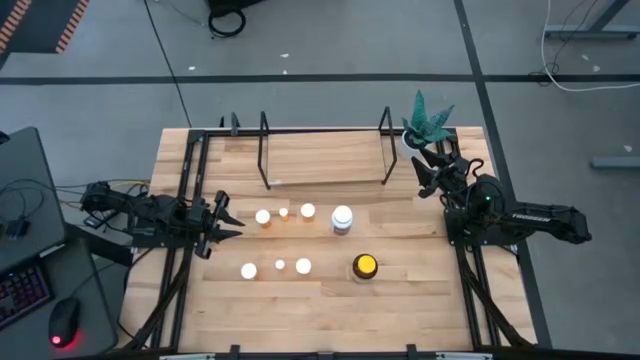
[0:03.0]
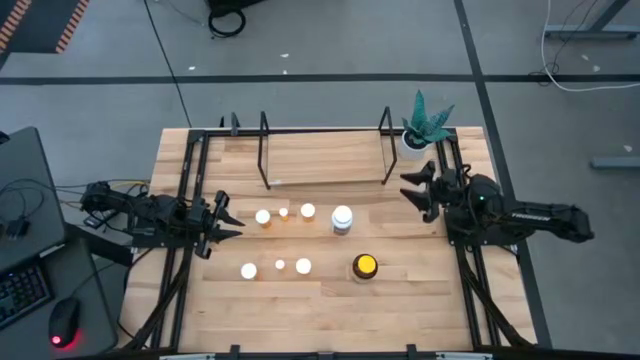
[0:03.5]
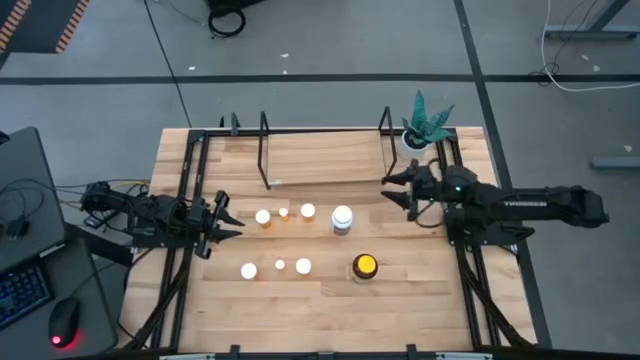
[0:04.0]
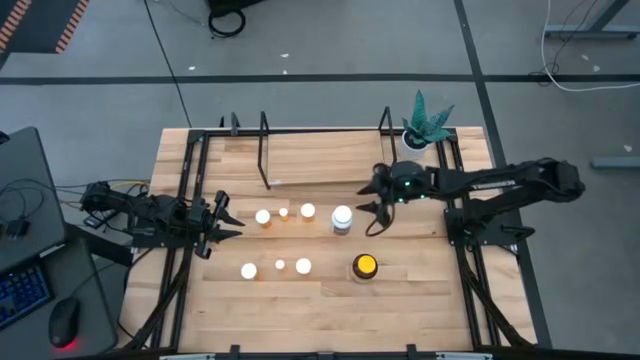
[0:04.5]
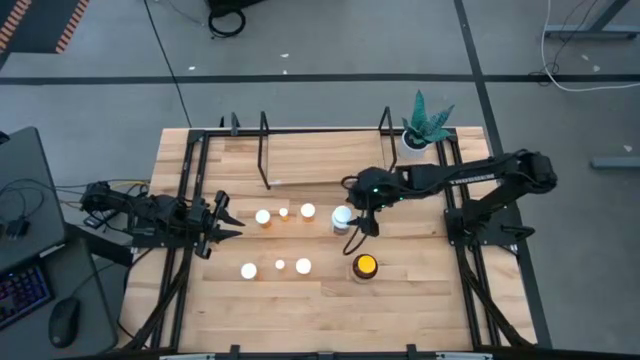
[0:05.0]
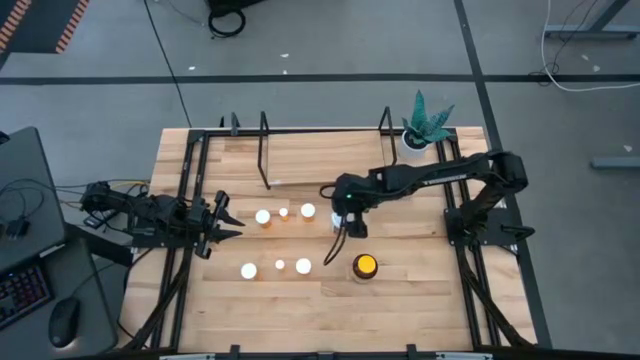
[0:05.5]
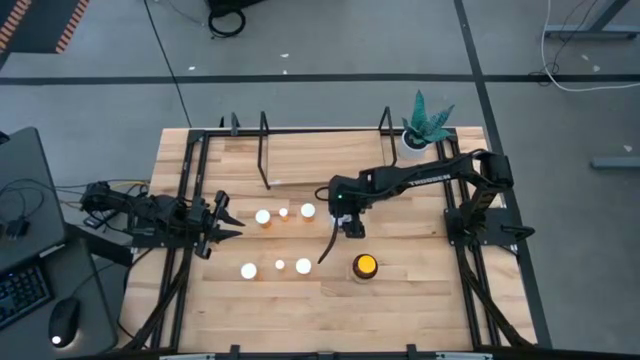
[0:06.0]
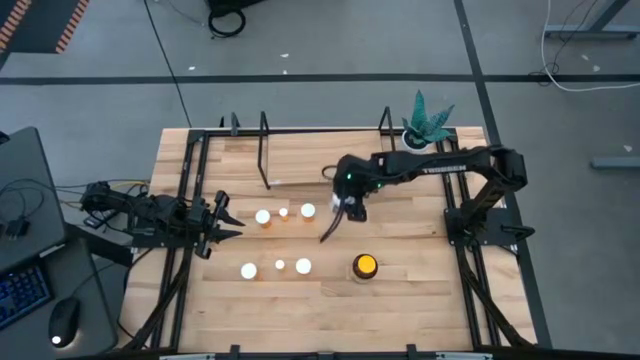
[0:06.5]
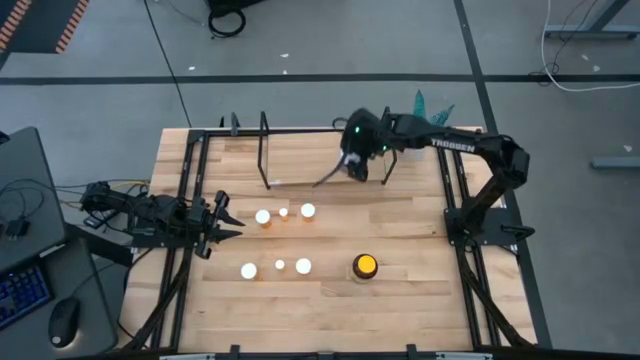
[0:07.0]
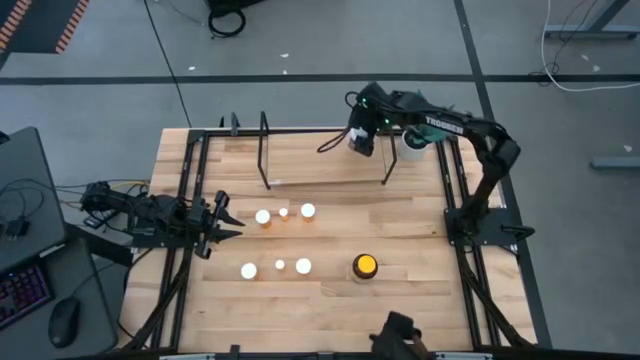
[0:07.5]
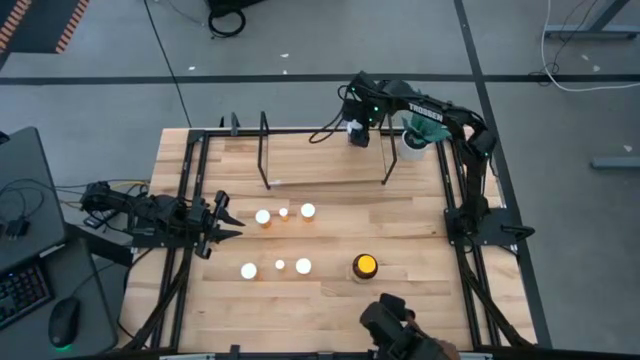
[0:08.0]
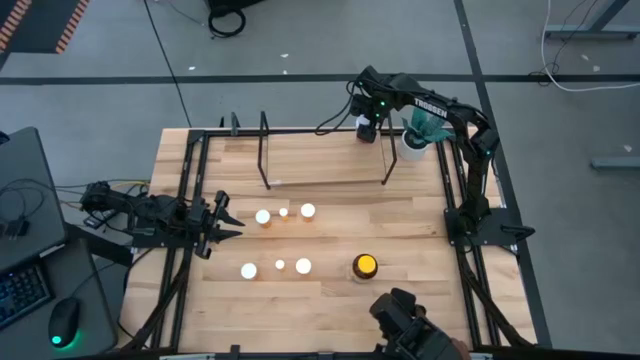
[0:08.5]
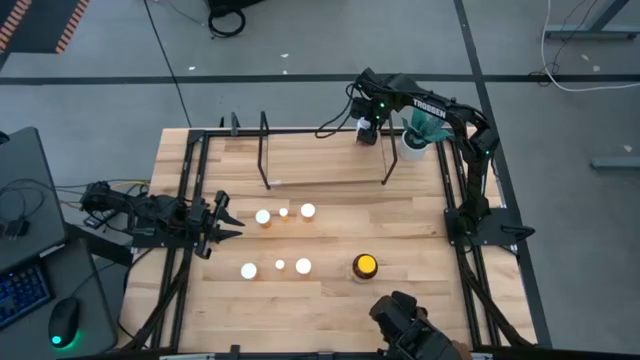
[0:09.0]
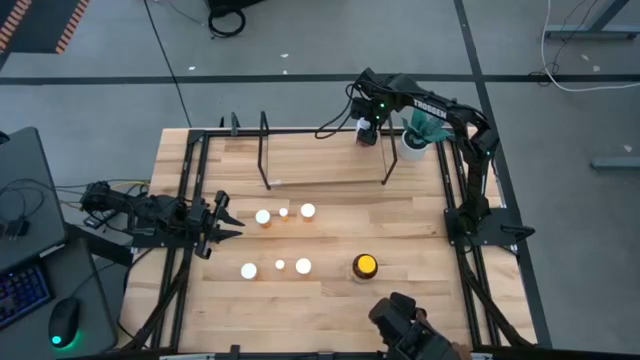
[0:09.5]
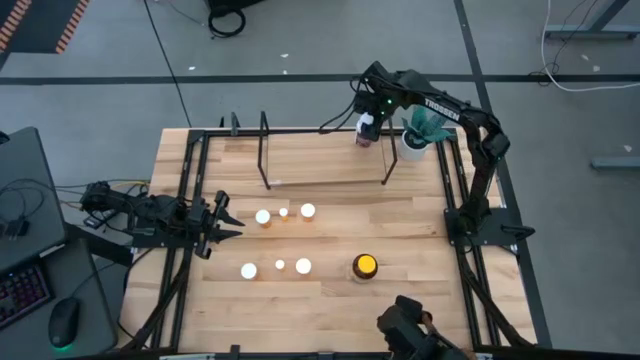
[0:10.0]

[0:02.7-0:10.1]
Task: Pick and place medicine bottles onto shelf by color
Put the white bottle on the shelf

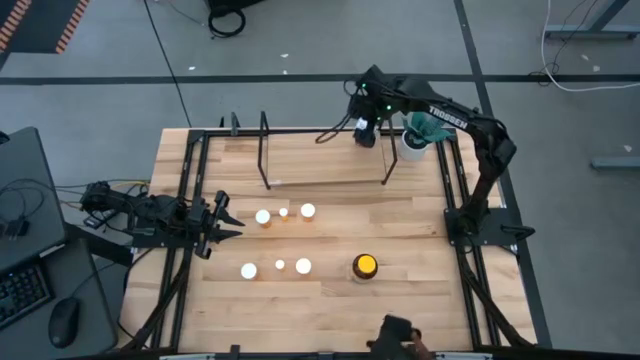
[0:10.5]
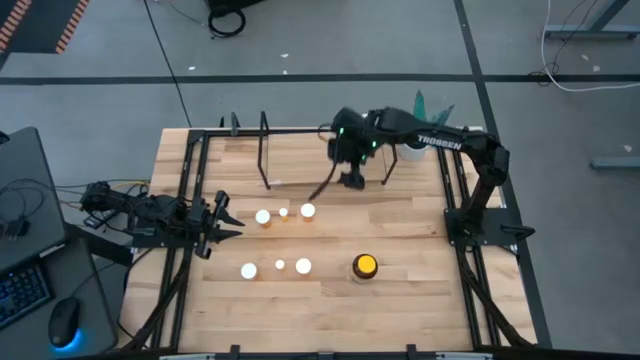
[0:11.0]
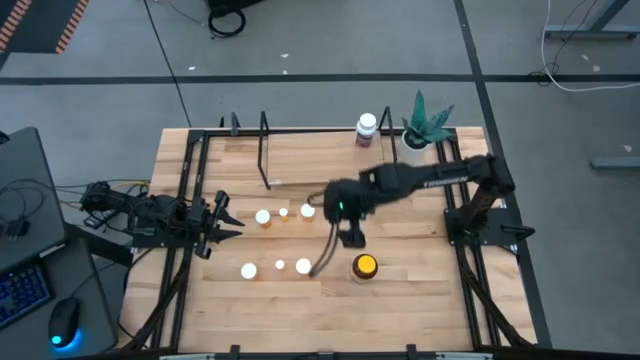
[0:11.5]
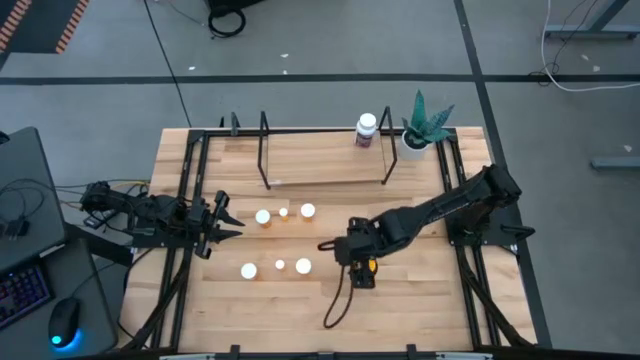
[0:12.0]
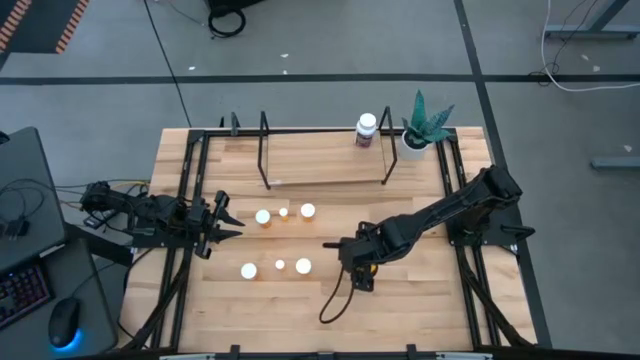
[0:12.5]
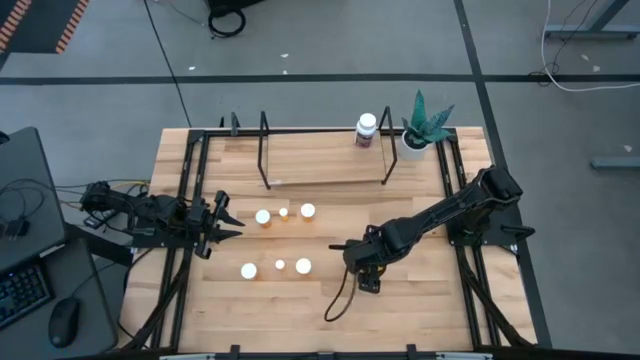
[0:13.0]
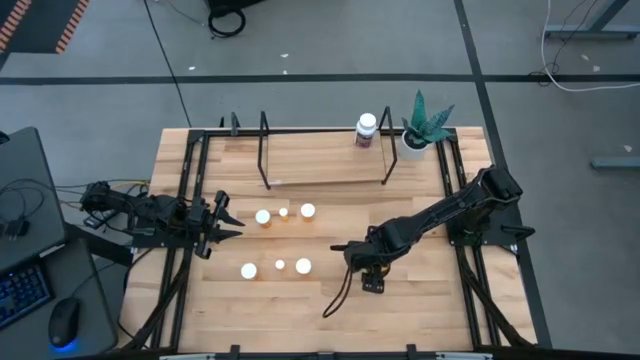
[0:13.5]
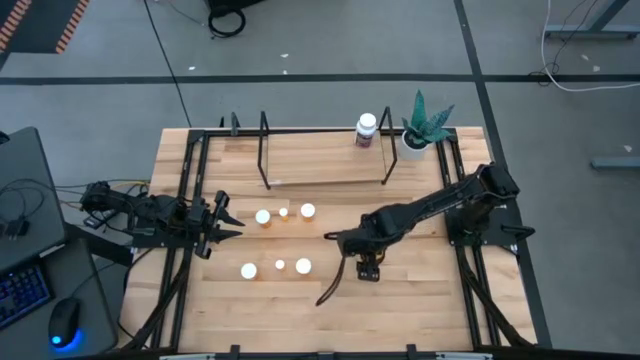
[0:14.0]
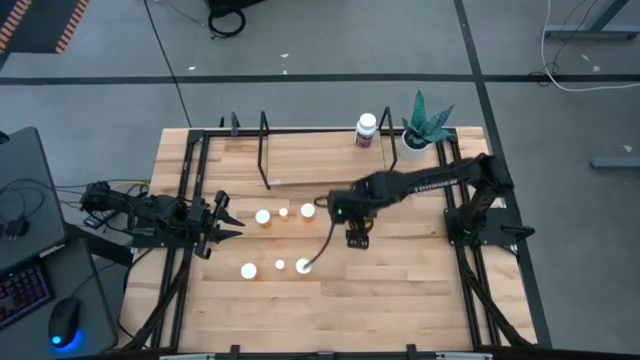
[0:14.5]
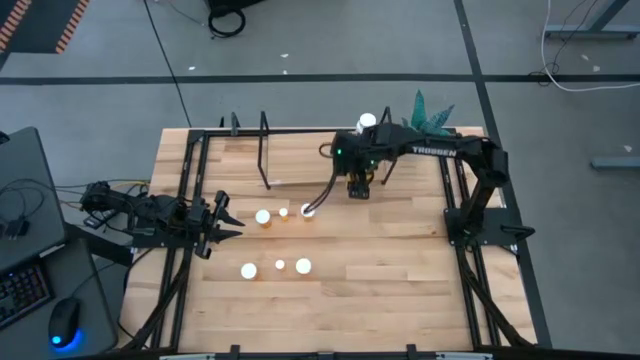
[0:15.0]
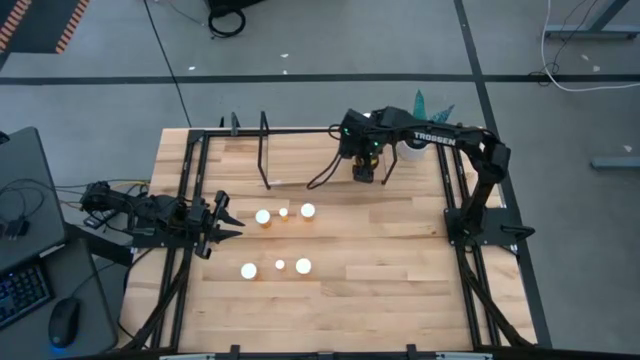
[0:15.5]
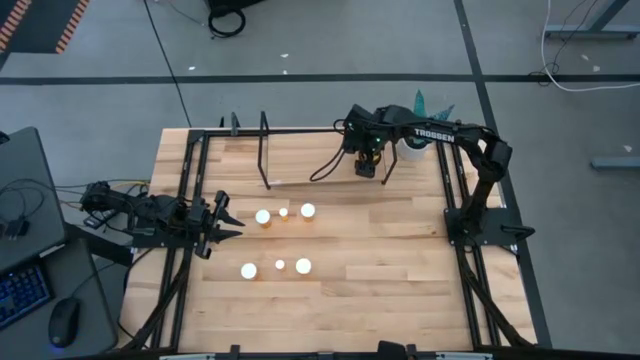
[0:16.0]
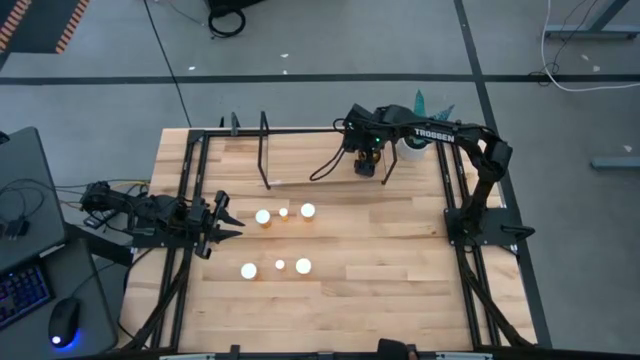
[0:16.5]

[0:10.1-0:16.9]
Put the yellow bottle on the shelf

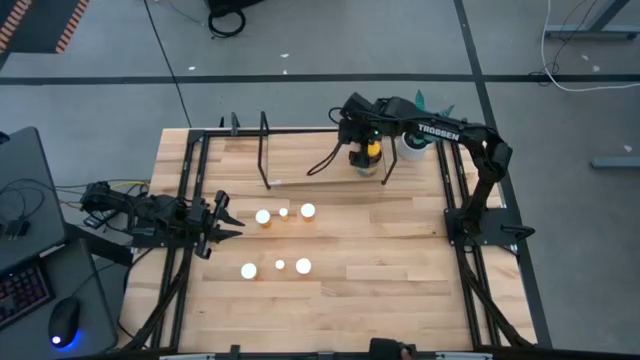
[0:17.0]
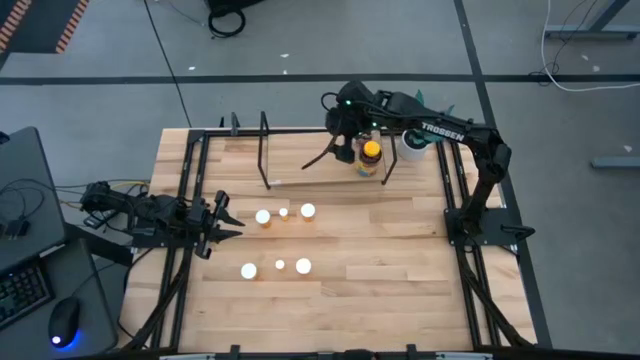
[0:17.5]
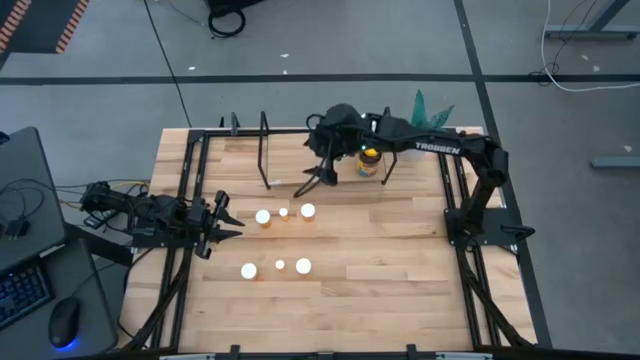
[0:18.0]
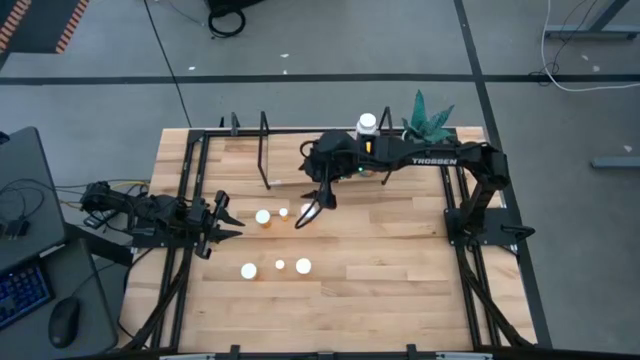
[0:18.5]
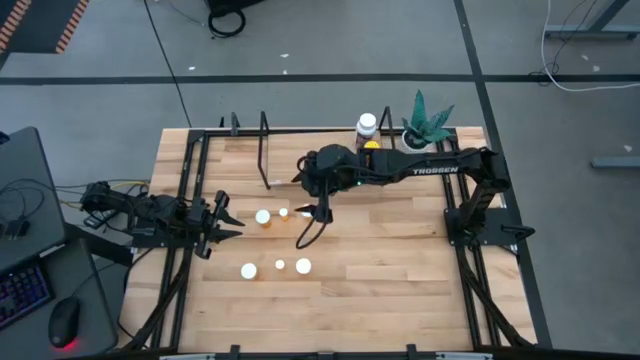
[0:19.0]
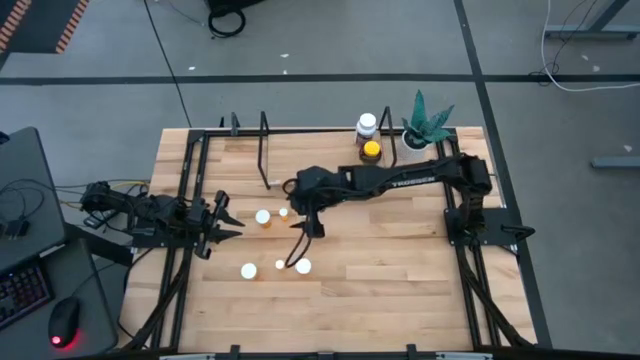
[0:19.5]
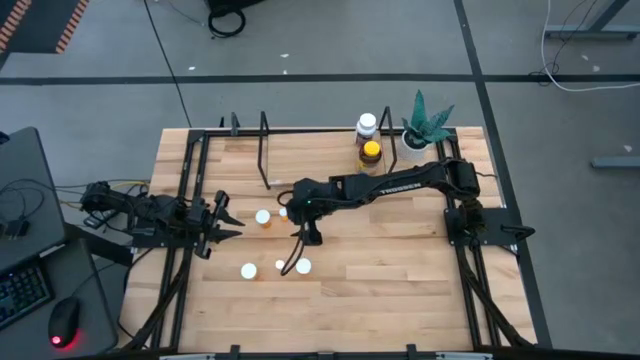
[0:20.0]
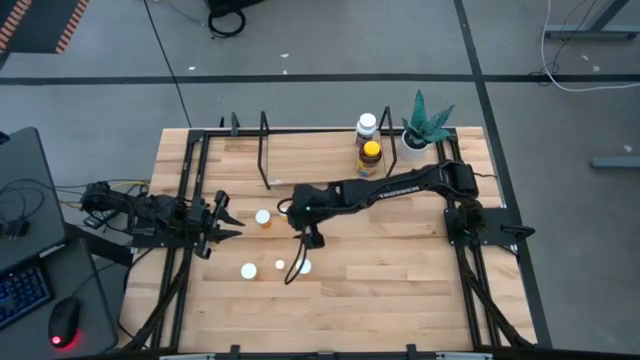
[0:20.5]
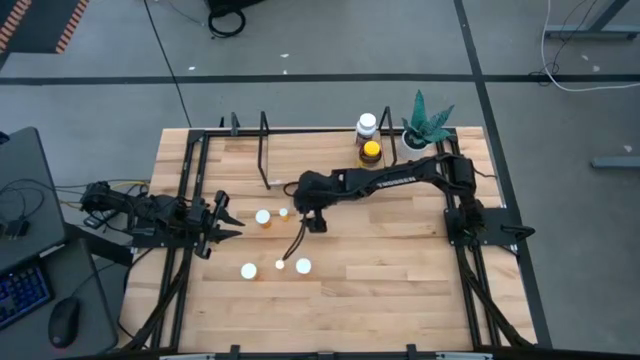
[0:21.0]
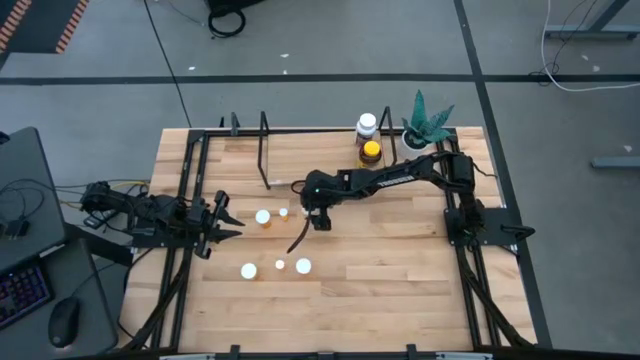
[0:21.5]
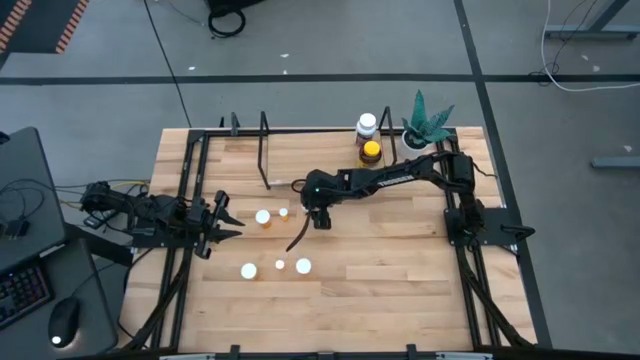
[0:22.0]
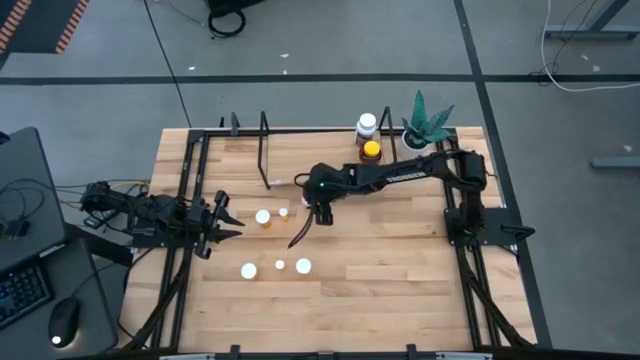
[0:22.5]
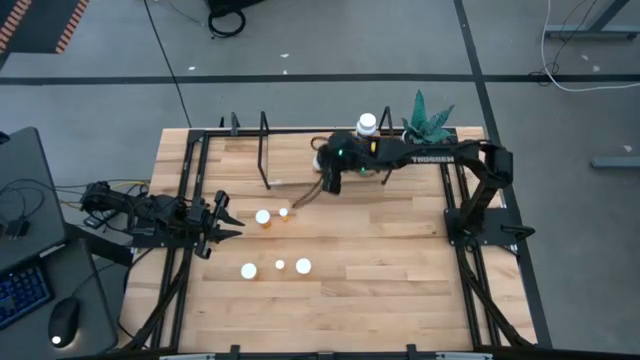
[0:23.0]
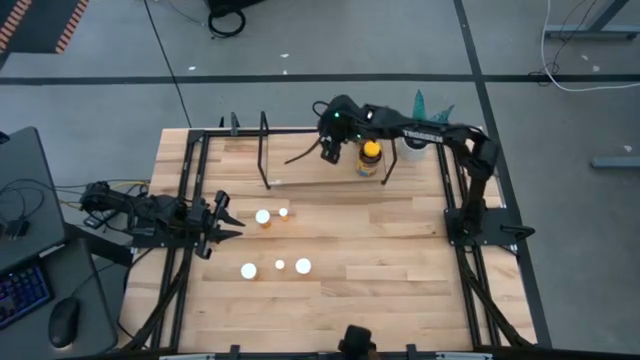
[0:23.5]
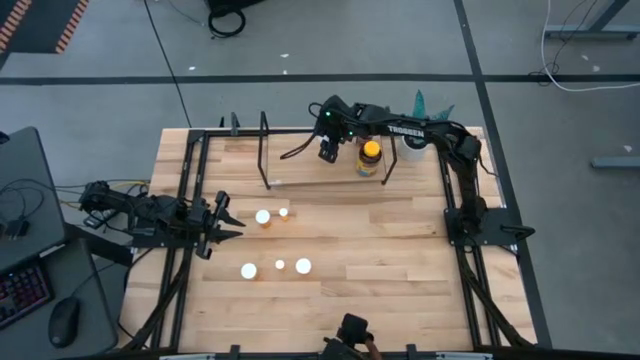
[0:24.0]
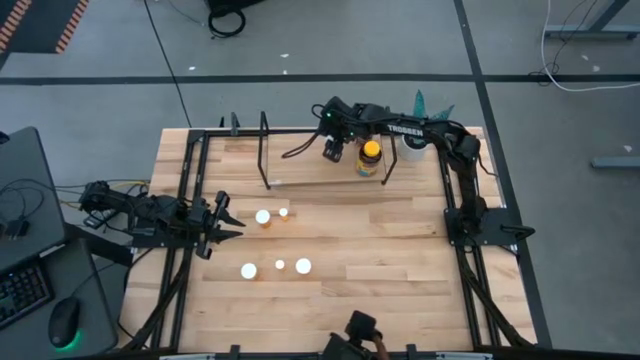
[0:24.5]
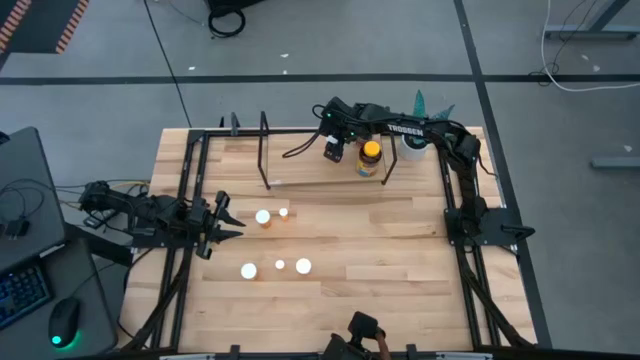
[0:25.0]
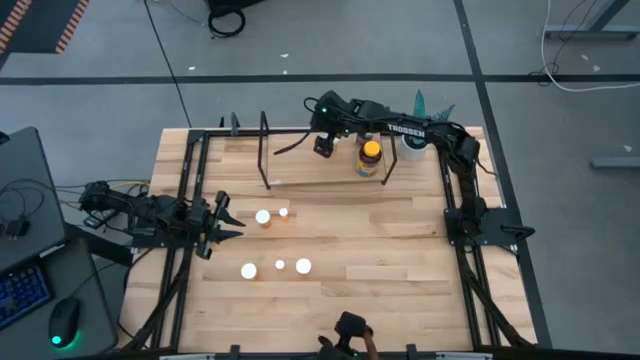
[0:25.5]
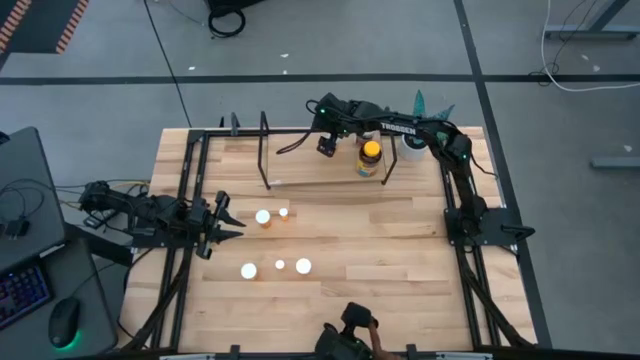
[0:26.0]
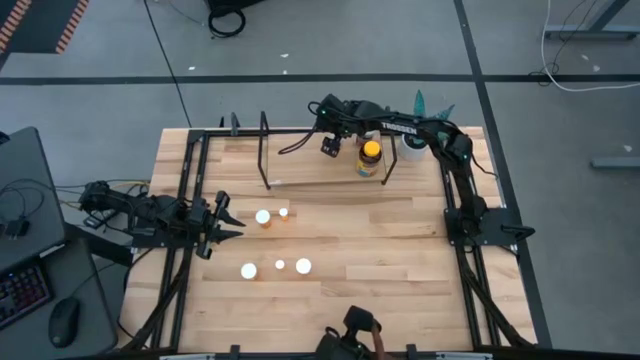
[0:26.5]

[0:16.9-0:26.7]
Put the large orange bottle on the shelf
